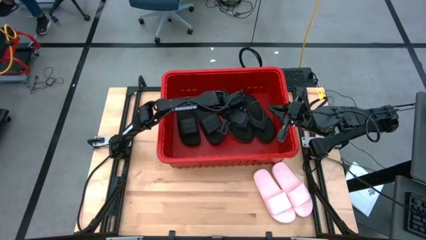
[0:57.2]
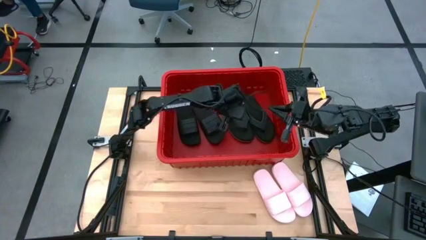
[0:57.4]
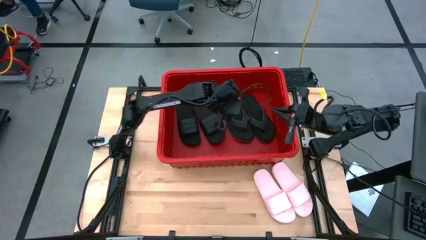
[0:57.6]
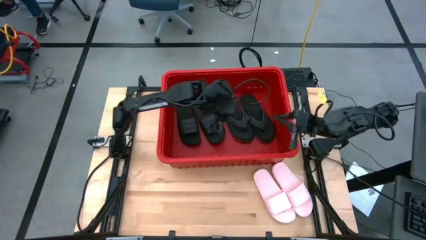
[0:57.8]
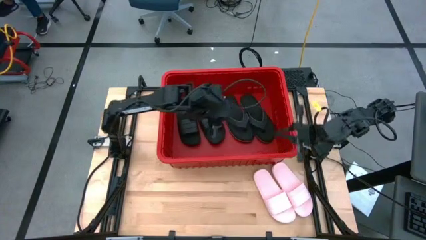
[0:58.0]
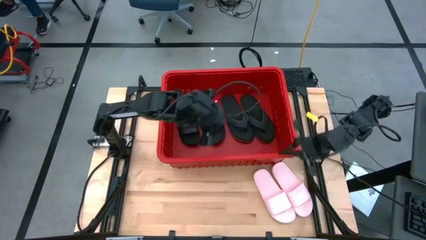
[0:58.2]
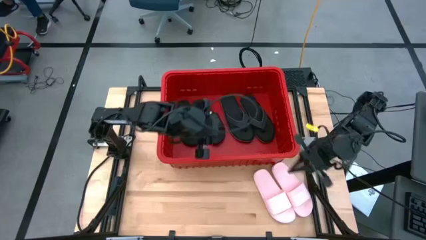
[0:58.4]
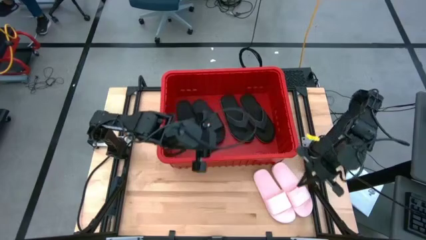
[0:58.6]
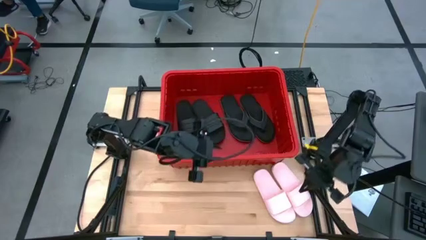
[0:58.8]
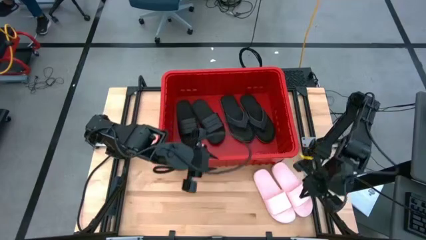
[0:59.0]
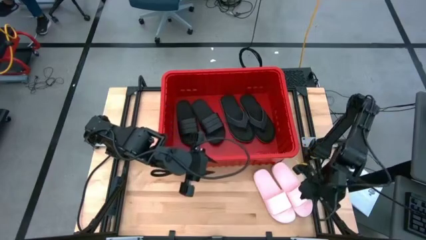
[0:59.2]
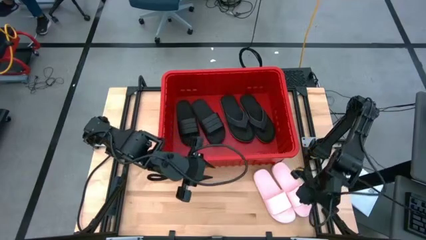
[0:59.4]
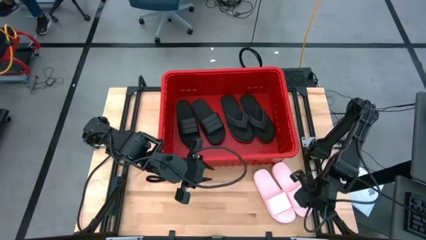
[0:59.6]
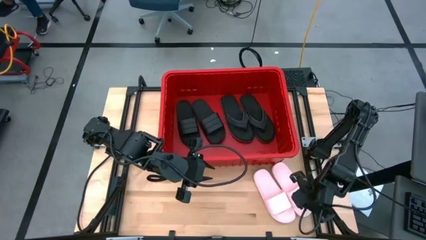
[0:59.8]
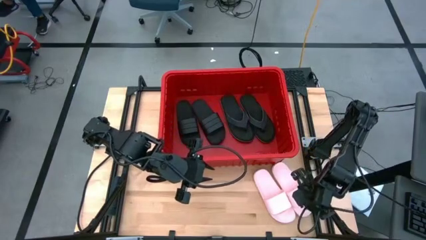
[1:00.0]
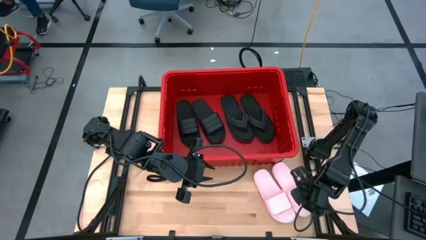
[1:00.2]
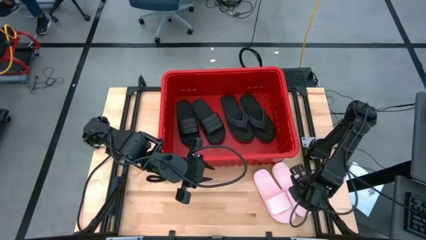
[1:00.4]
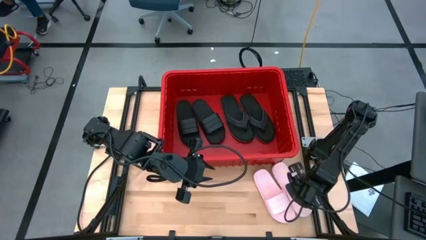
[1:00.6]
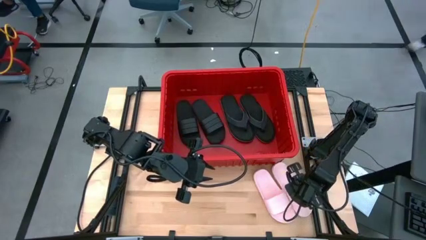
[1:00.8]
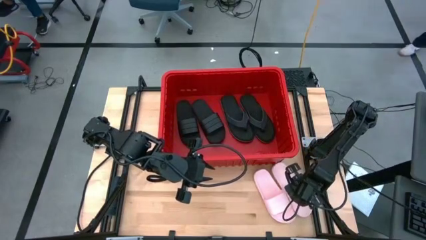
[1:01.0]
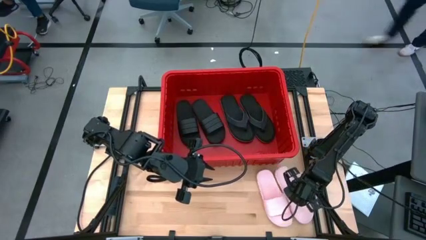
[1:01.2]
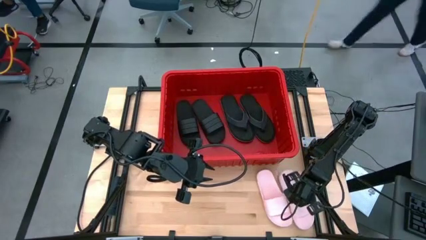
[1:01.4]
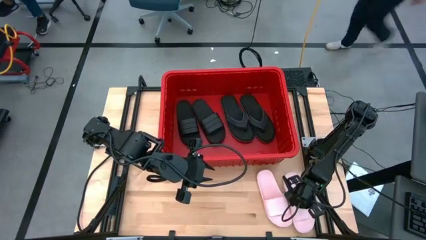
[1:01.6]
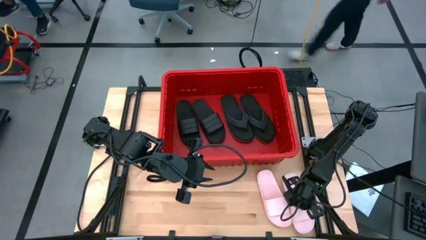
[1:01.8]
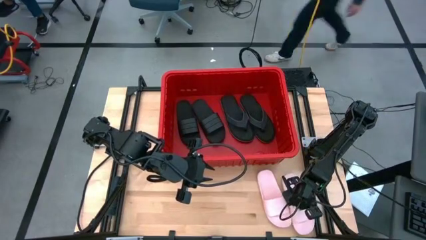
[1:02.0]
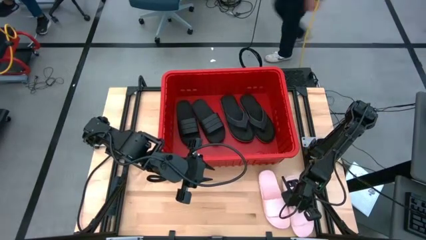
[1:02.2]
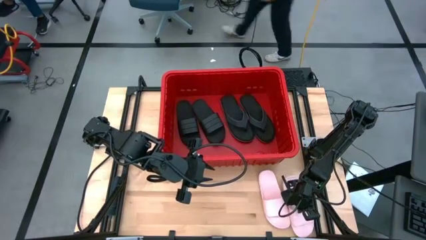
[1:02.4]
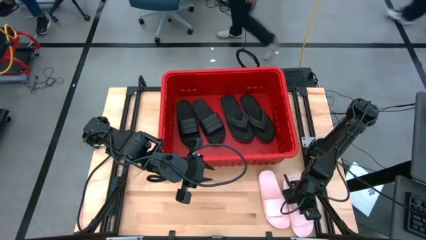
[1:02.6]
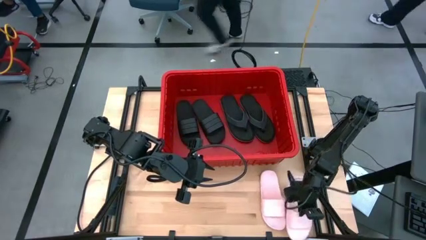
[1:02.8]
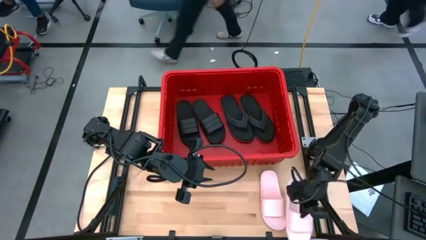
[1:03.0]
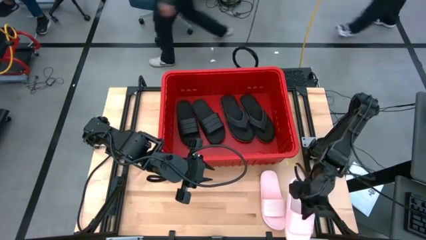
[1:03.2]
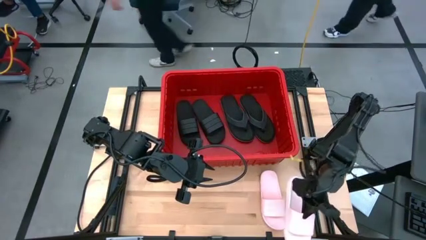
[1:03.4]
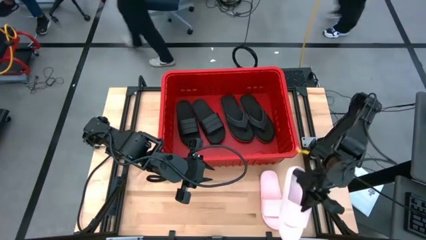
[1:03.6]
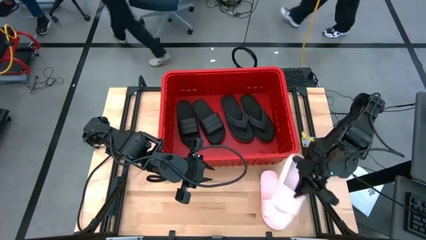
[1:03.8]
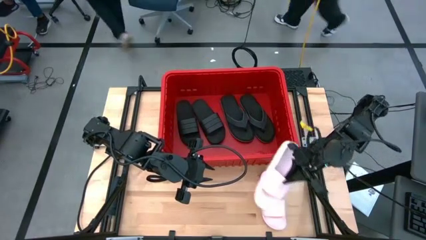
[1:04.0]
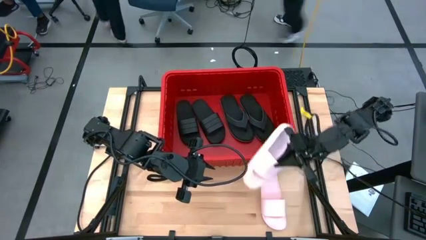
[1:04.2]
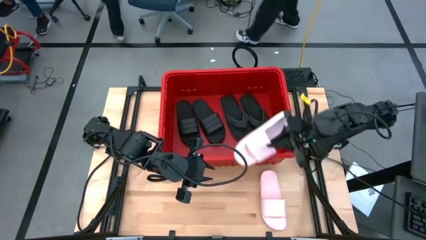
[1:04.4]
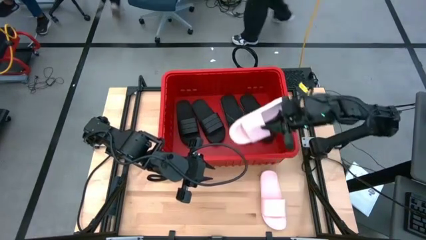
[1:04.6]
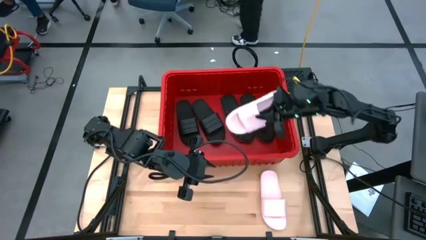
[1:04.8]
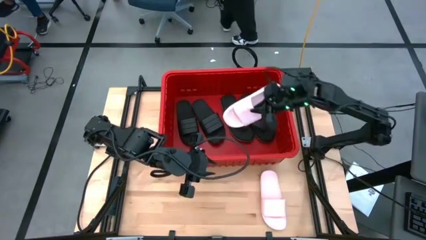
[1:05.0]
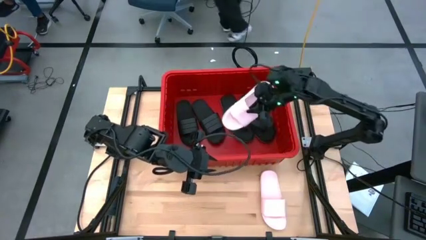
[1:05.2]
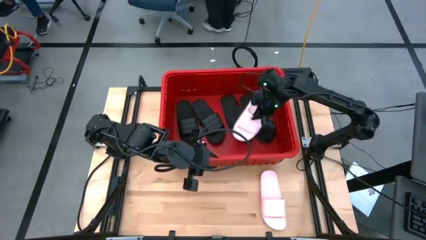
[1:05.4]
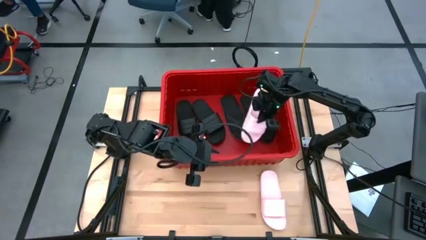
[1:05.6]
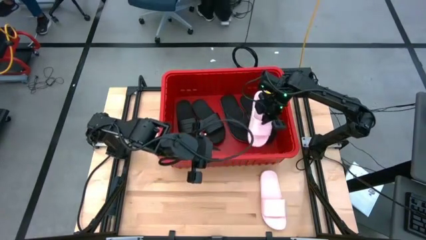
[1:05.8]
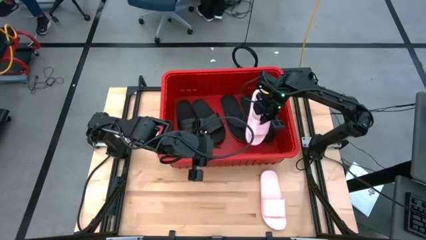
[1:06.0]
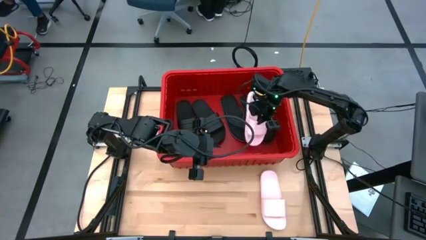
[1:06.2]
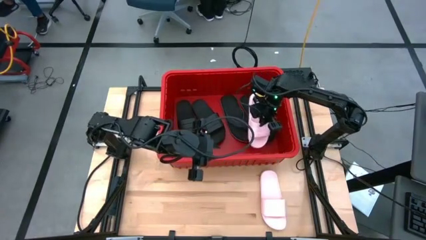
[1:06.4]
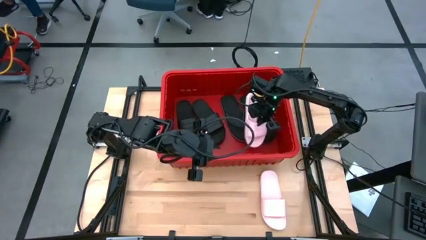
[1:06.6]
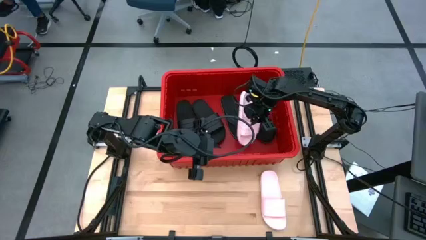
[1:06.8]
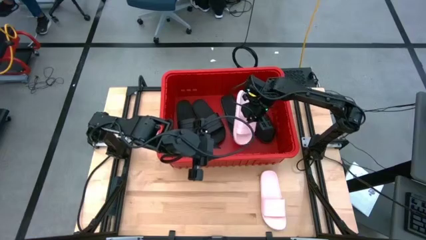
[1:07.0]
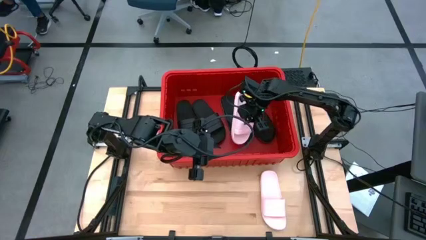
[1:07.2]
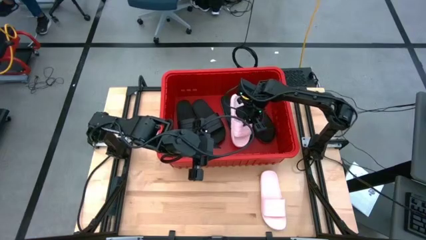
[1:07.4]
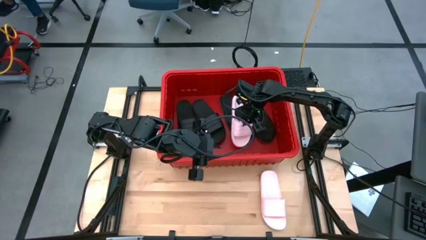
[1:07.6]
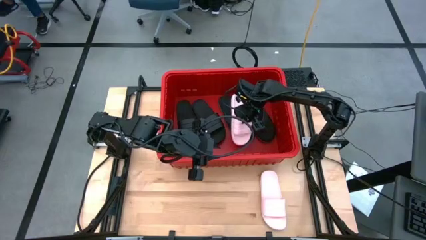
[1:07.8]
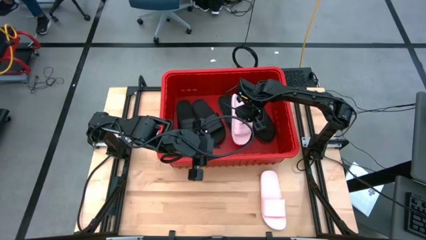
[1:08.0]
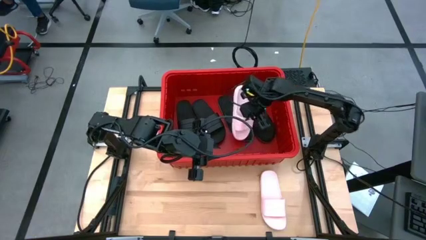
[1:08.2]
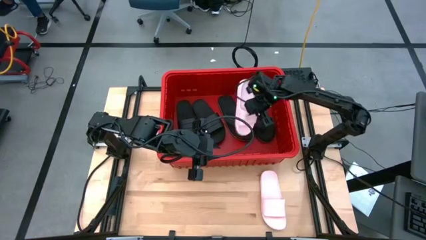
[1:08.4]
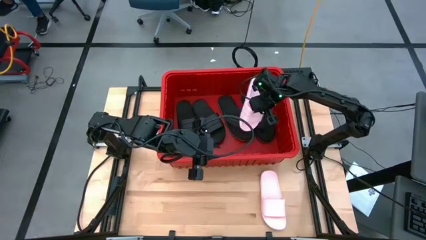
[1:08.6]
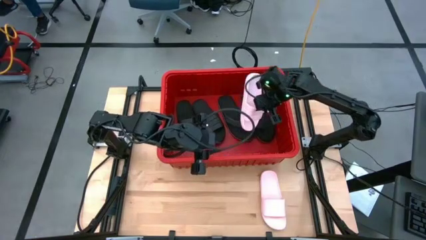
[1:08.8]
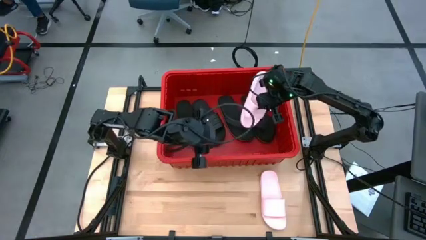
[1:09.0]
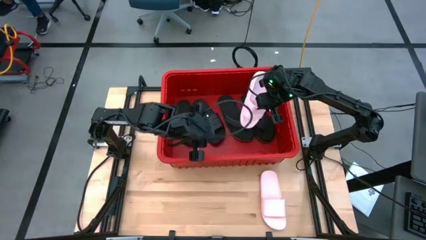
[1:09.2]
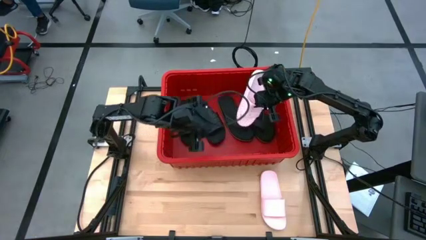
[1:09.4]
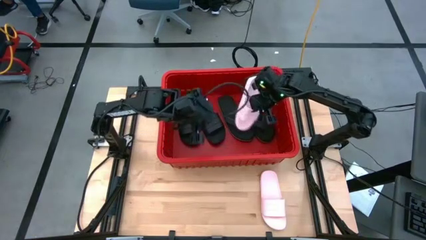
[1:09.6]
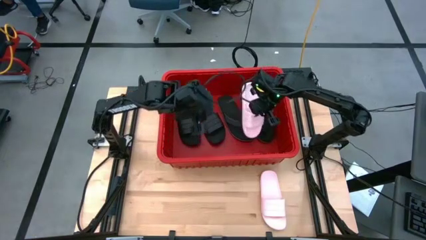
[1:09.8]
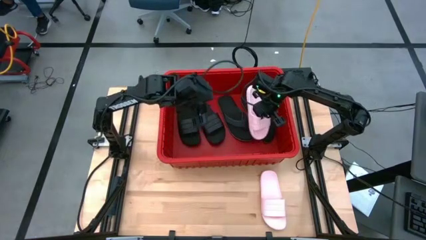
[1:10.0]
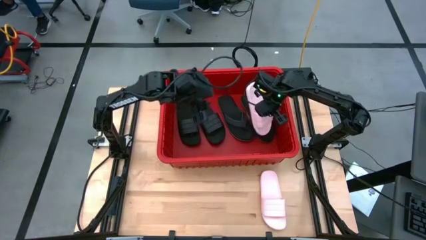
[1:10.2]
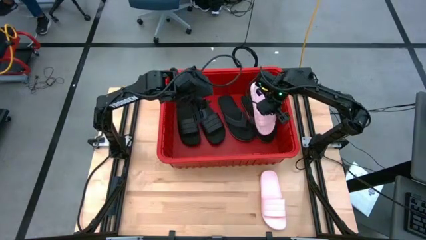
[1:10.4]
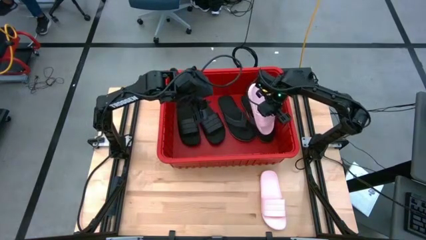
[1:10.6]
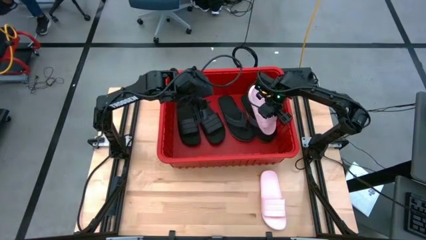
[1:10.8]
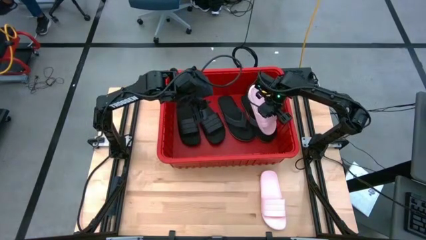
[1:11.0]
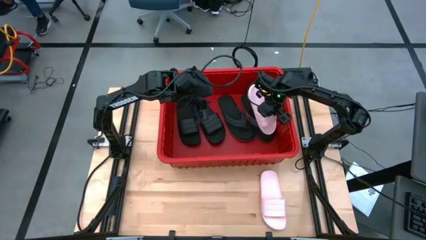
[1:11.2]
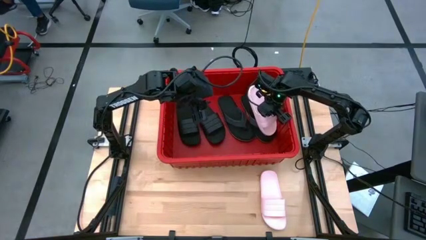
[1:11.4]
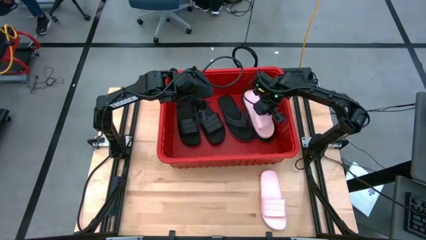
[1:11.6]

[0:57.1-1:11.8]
Task: Pick and place slides into bin
Put the right pink slide into the red container

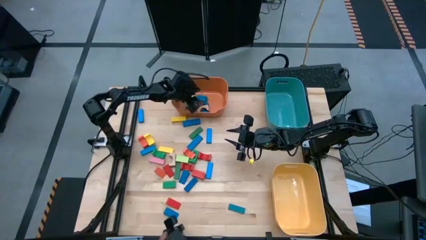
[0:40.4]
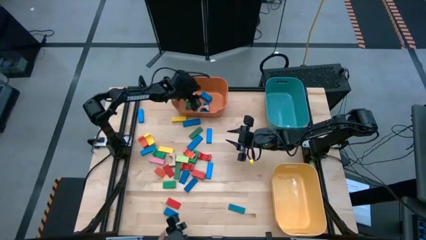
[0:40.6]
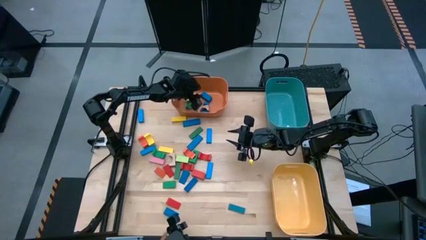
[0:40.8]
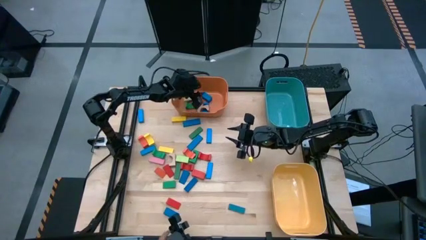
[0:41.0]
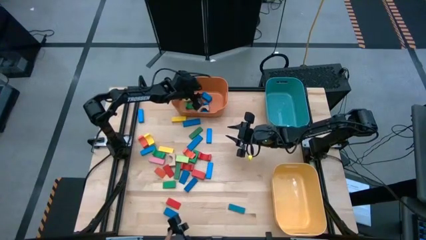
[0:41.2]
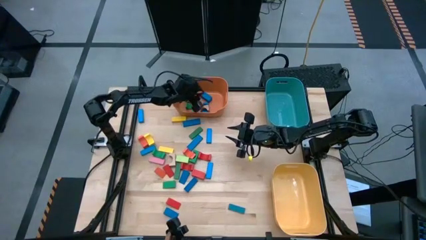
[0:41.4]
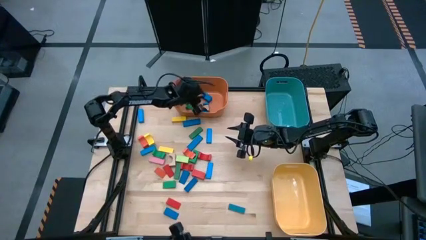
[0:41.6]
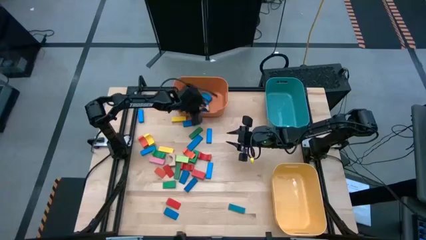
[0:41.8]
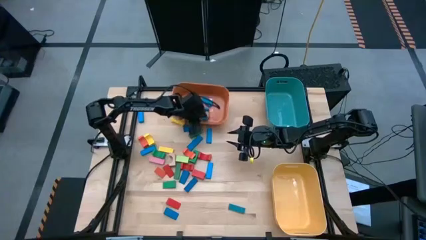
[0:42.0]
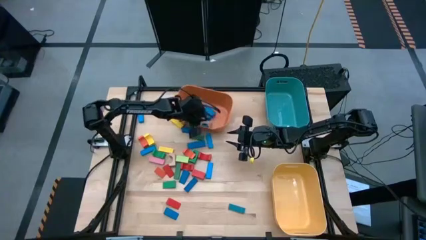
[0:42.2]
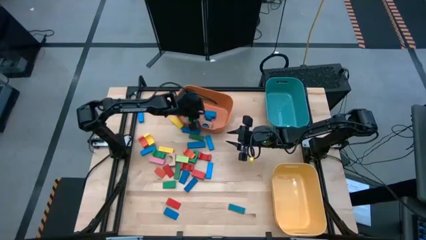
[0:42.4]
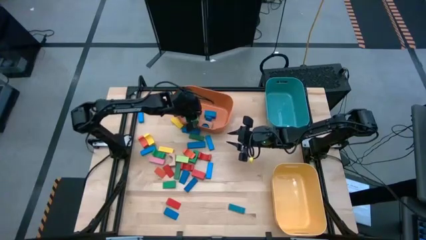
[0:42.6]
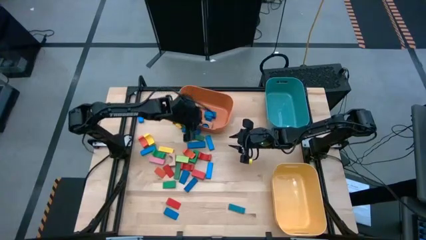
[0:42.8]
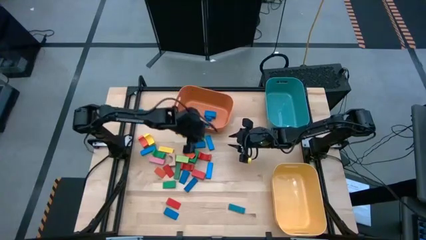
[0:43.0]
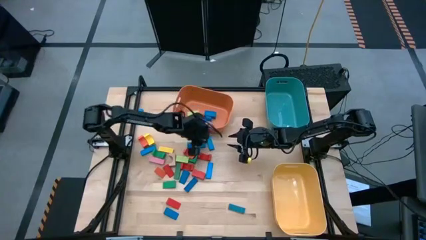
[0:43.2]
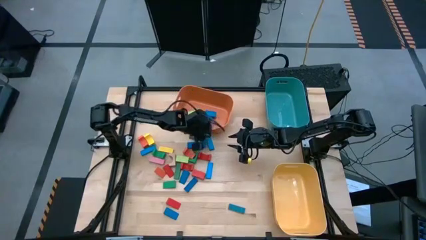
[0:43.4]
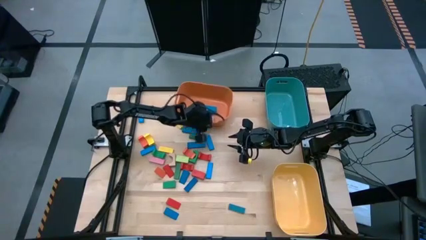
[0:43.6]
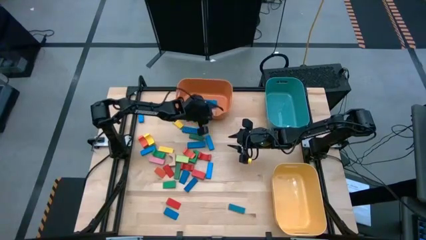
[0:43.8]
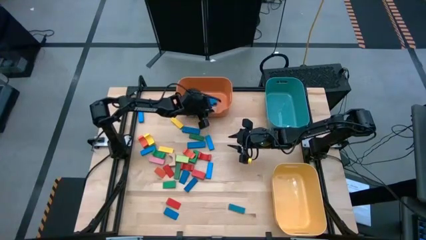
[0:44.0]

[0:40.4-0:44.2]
Task: Sort blocks by size
Adjust the orange bin
